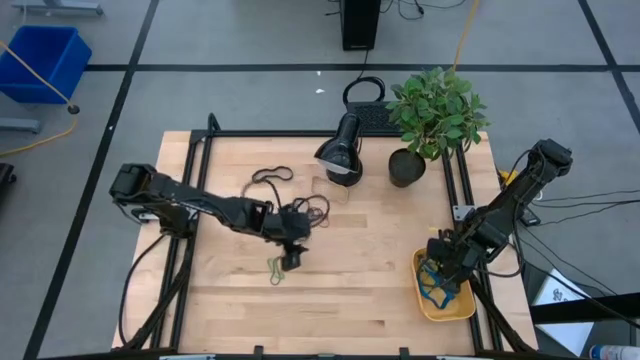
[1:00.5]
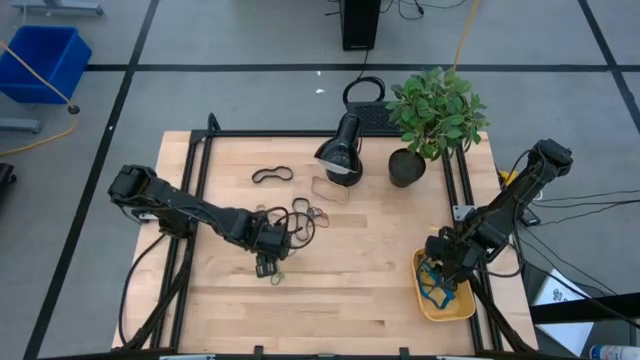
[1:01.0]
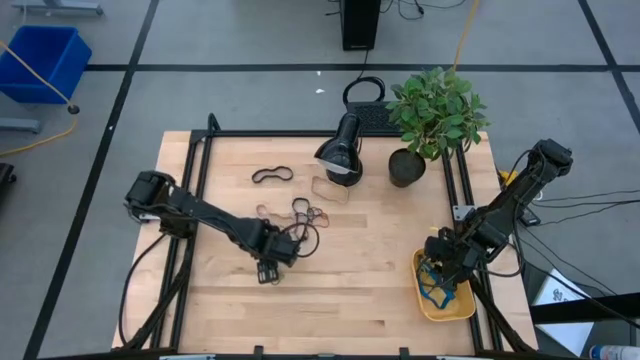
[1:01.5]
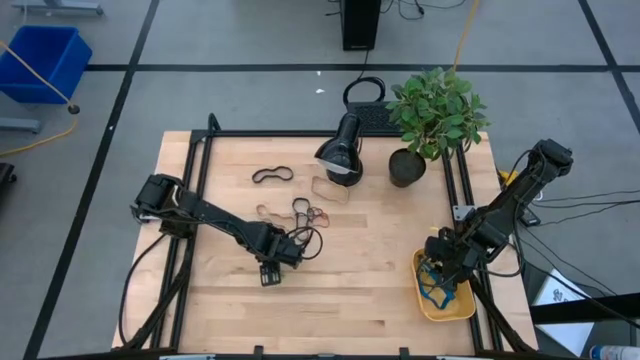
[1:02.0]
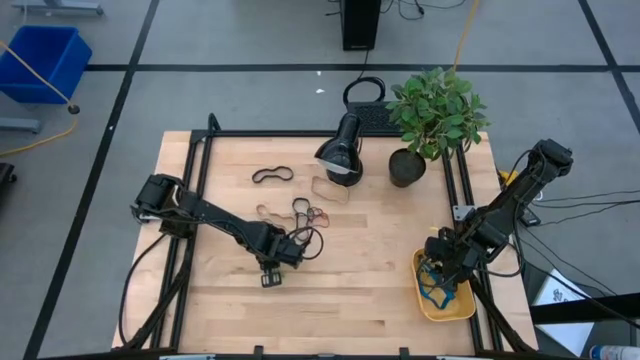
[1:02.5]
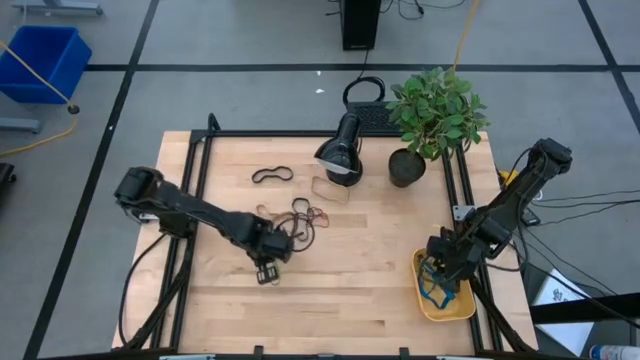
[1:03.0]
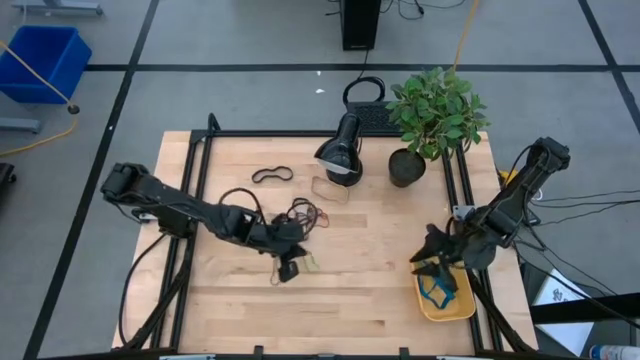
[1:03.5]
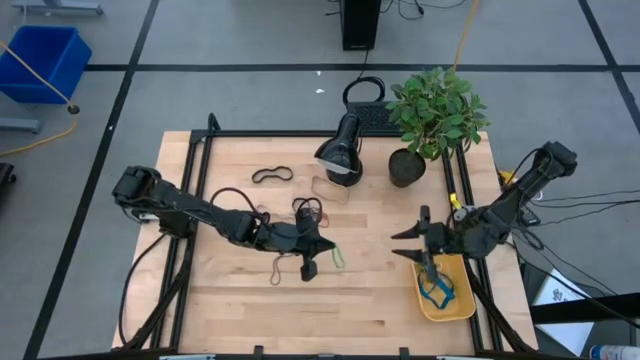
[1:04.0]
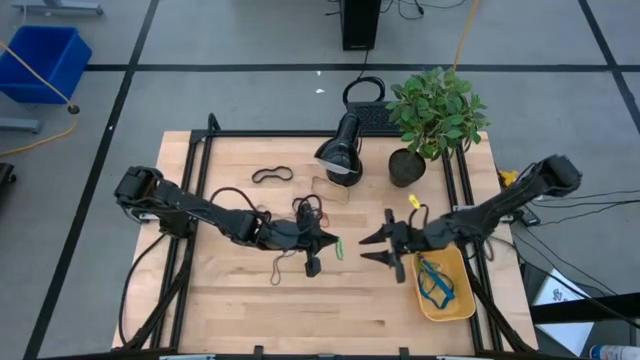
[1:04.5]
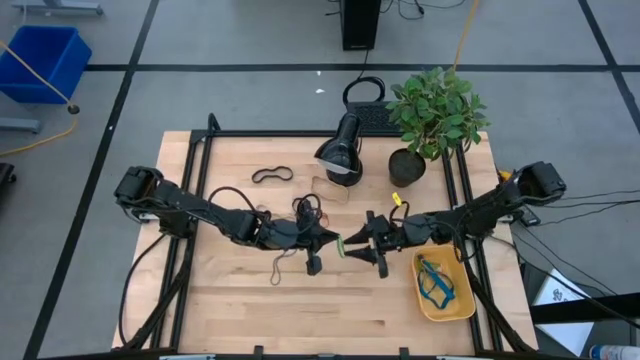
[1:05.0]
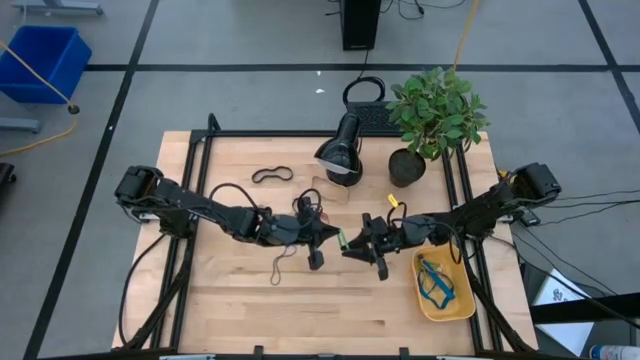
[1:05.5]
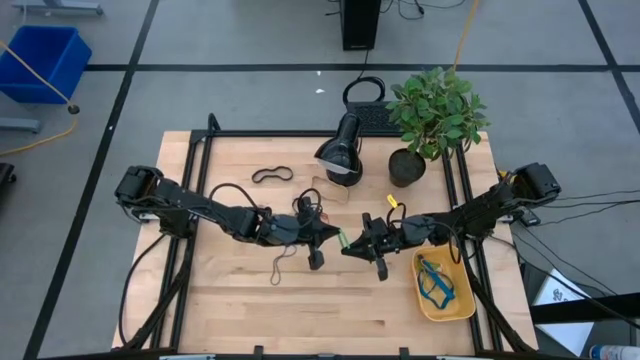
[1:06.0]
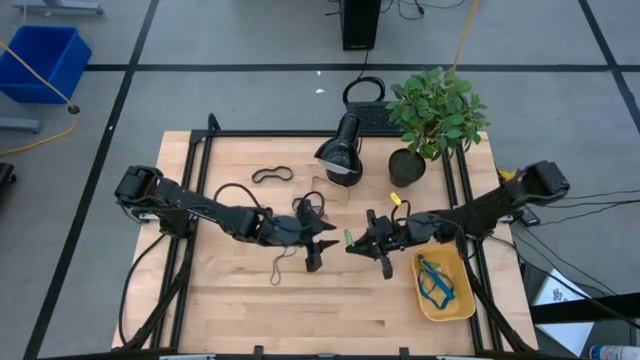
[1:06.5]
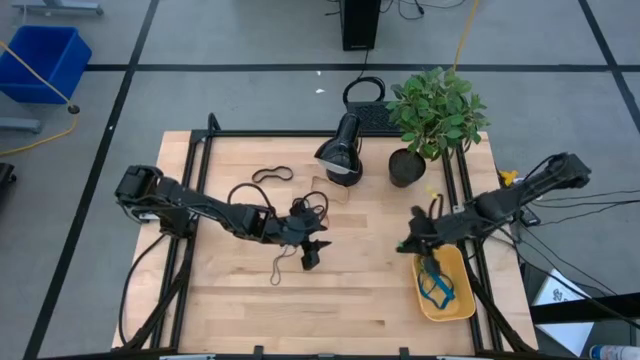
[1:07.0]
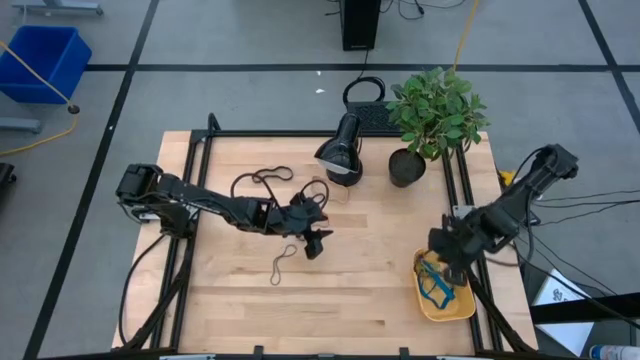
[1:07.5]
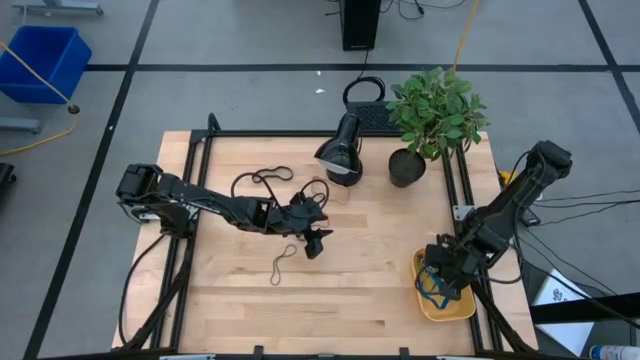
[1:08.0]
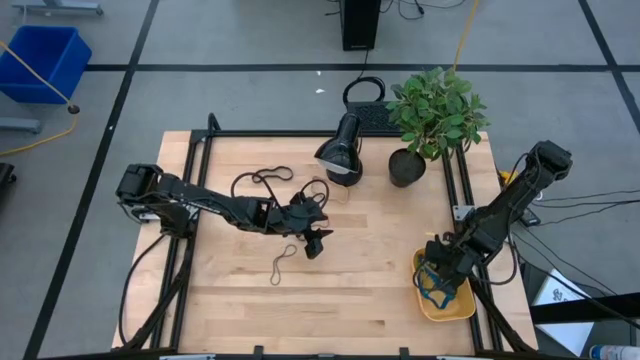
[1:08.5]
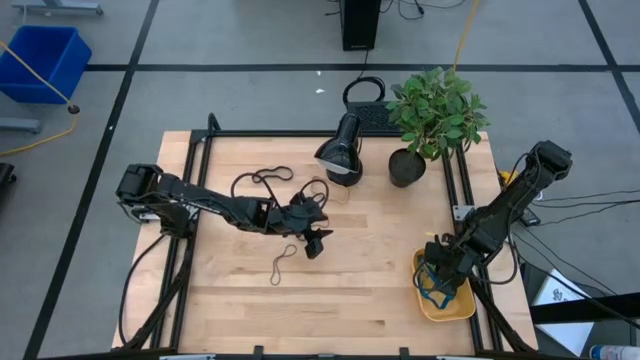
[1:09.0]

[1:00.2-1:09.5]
Task: Pick and place rubber bands into bin
Put the green rubber band into the yellow bin

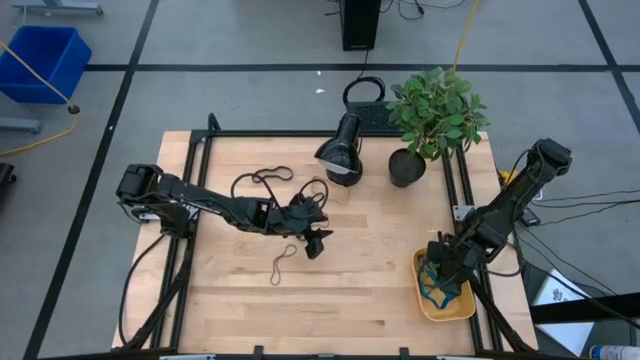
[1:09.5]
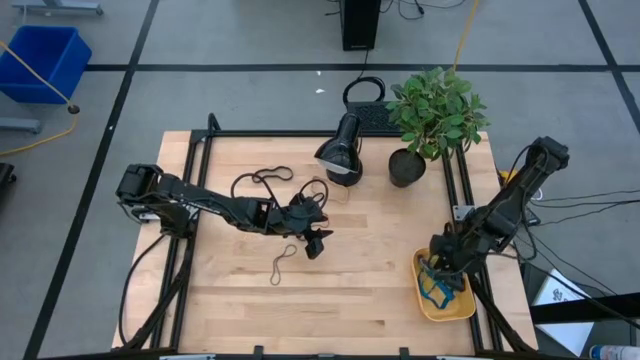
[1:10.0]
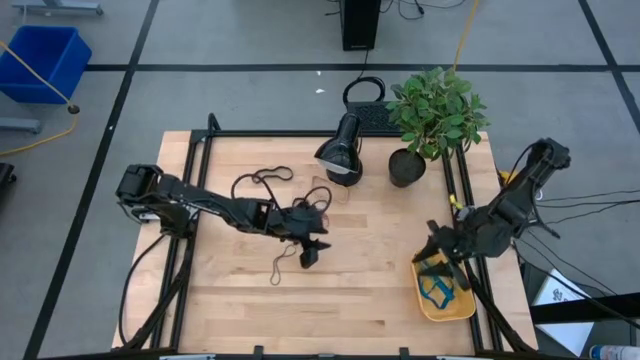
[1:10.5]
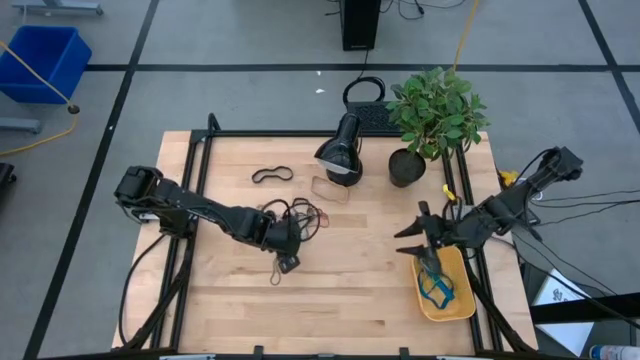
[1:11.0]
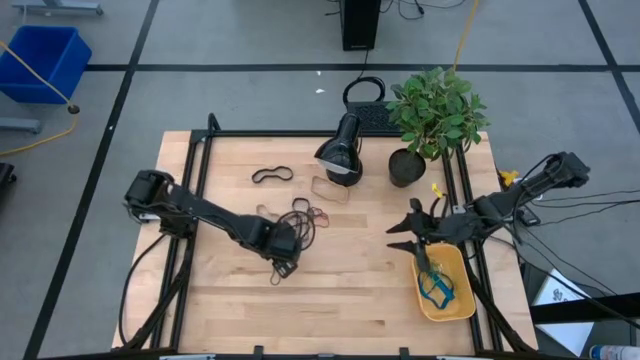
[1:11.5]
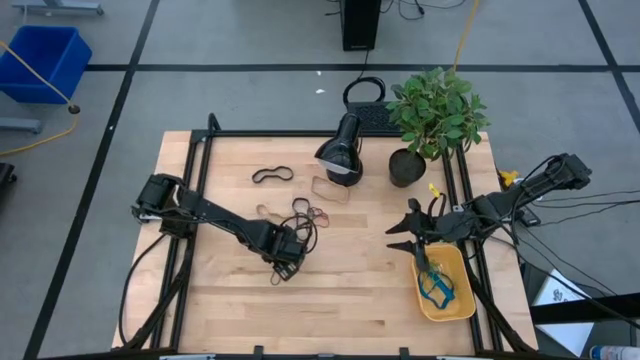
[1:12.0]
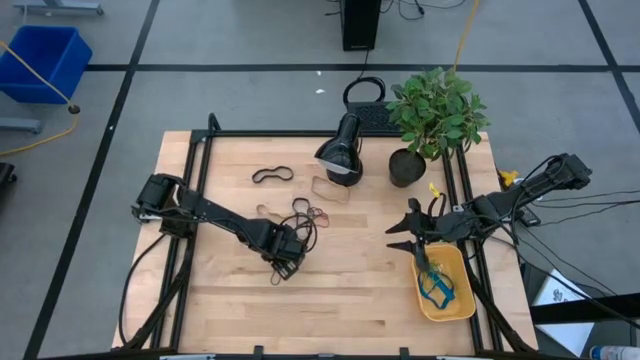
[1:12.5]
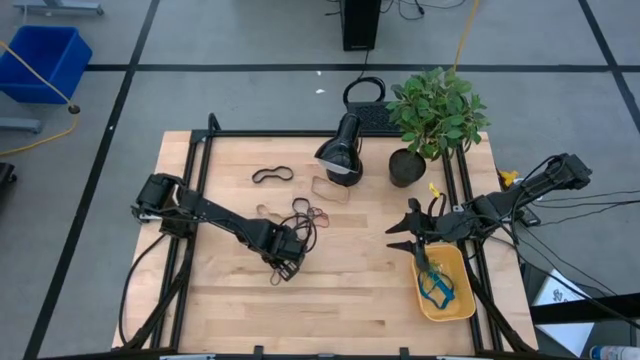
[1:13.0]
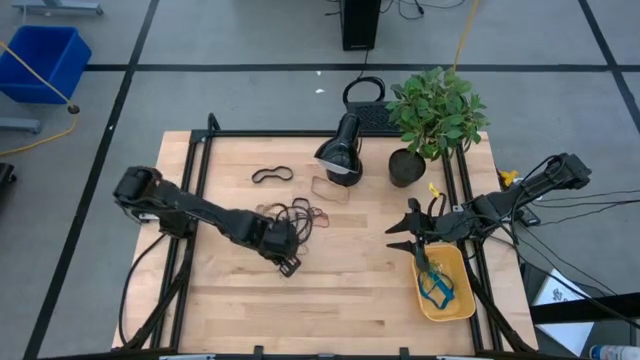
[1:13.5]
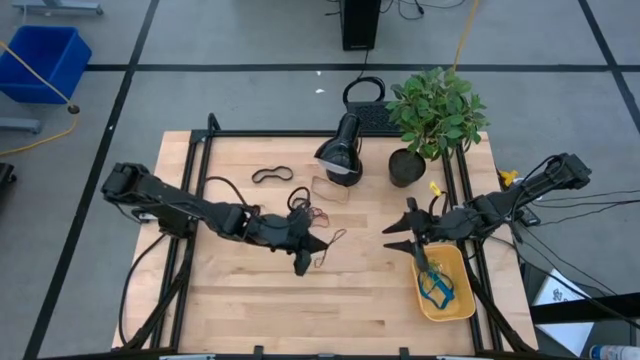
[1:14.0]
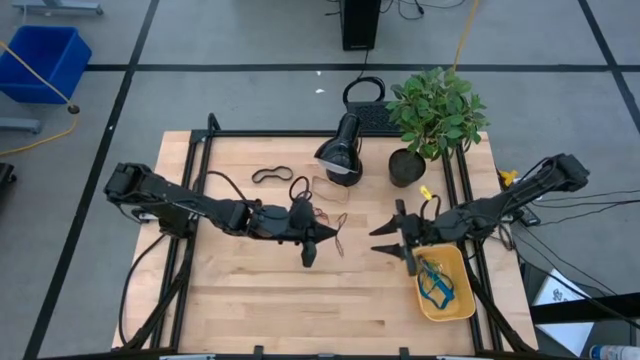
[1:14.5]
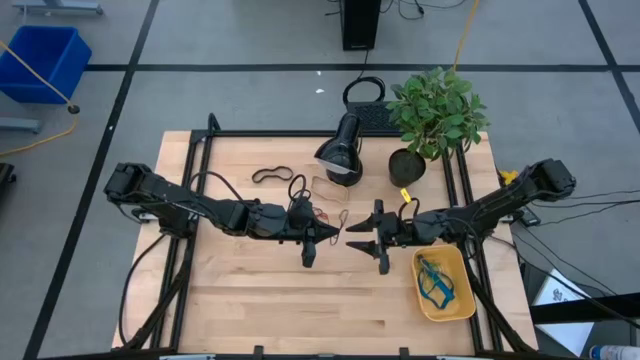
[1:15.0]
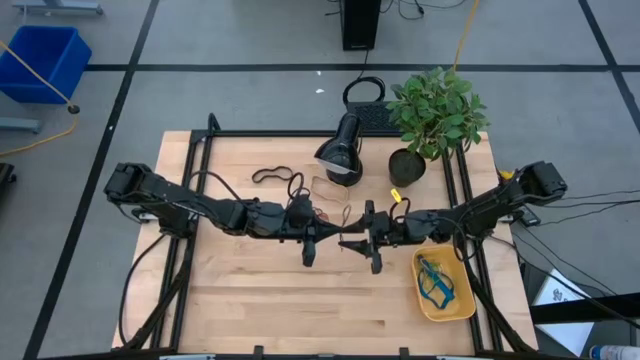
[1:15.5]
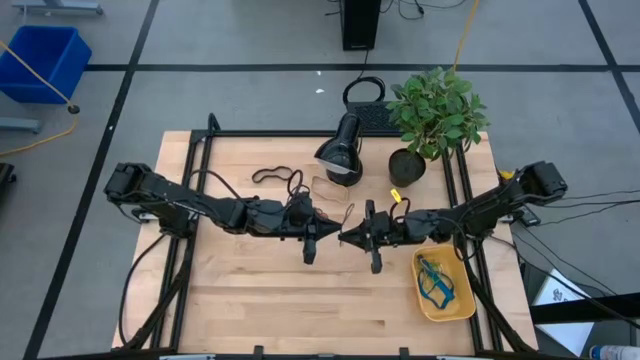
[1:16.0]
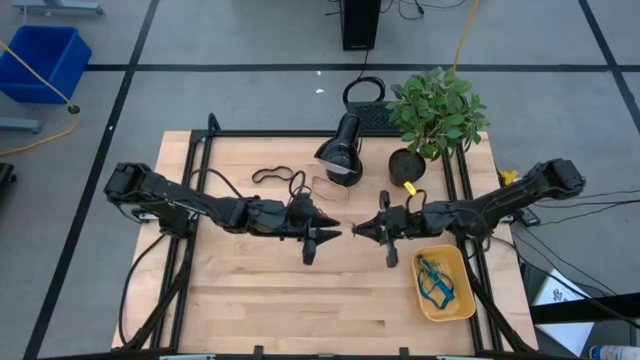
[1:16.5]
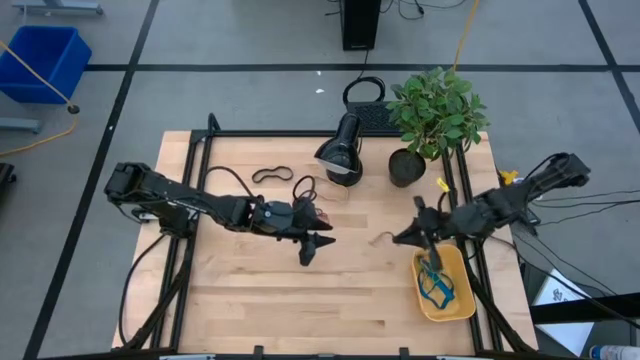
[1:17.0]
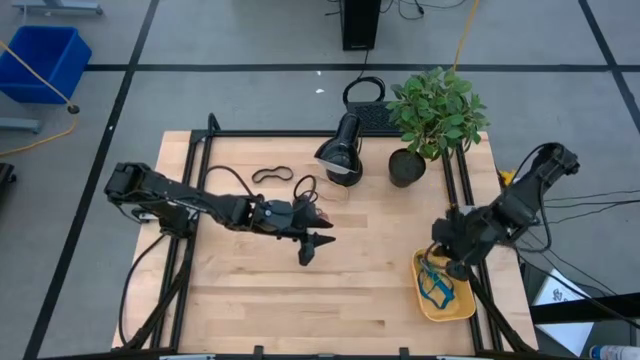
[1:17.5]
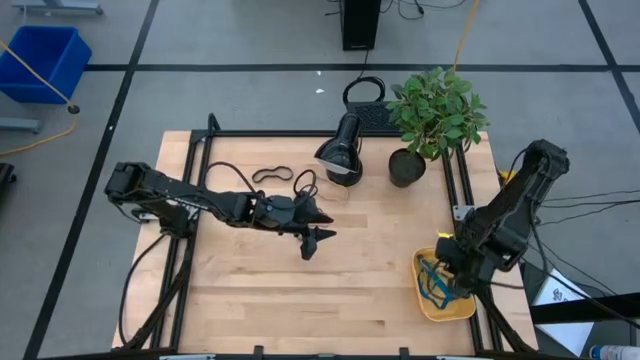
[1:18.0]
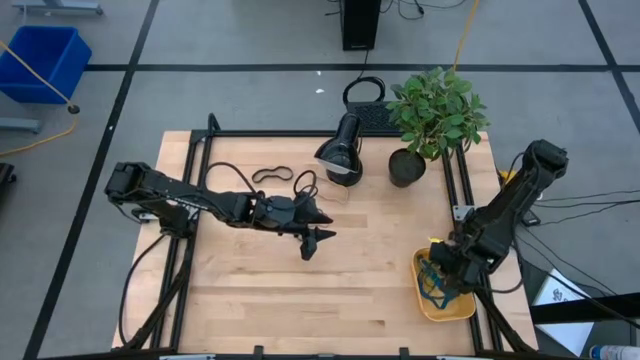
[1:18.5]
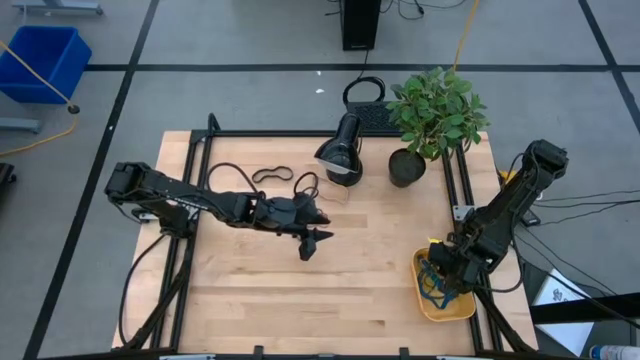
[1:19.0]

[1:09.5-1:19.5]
Put the violet rubber band into the yellow bin

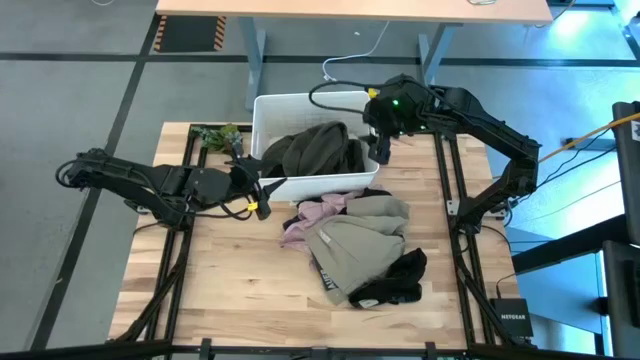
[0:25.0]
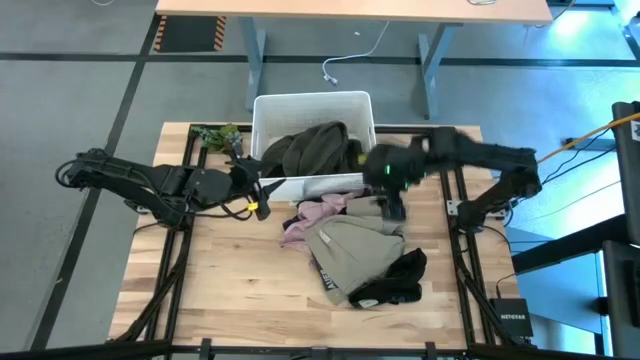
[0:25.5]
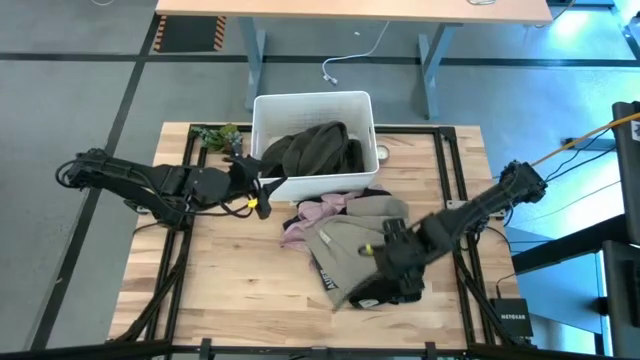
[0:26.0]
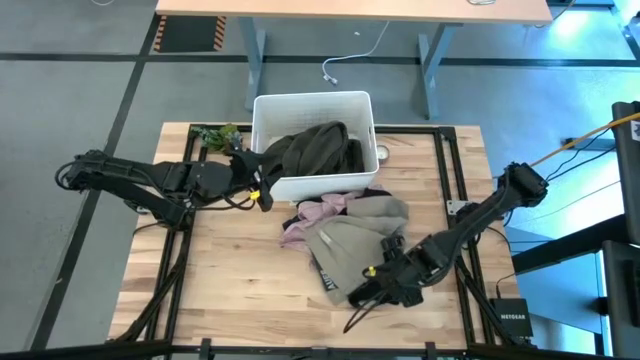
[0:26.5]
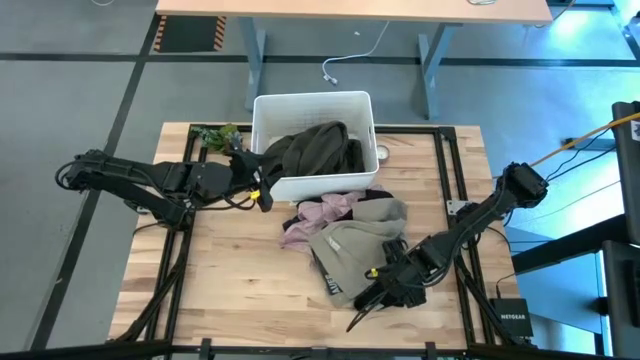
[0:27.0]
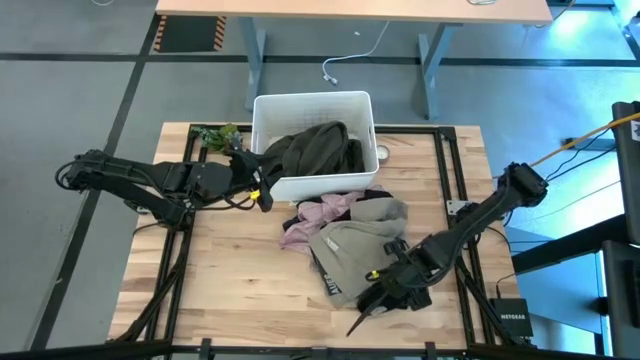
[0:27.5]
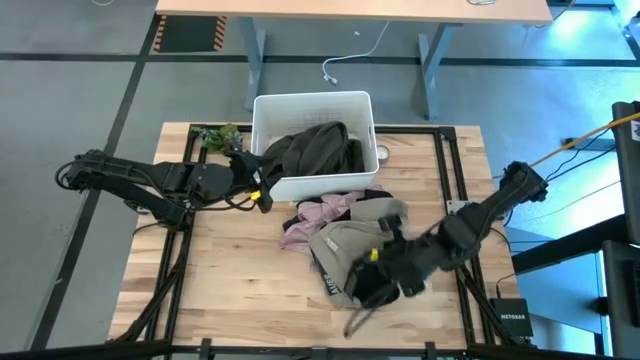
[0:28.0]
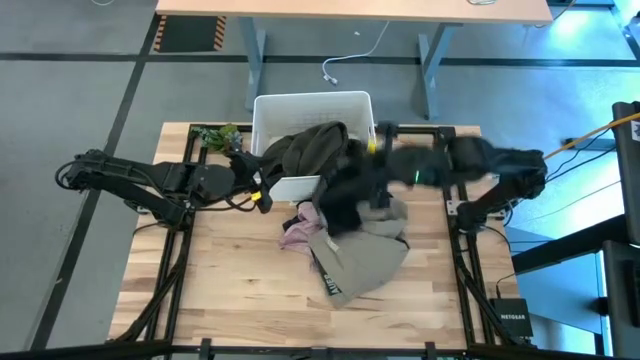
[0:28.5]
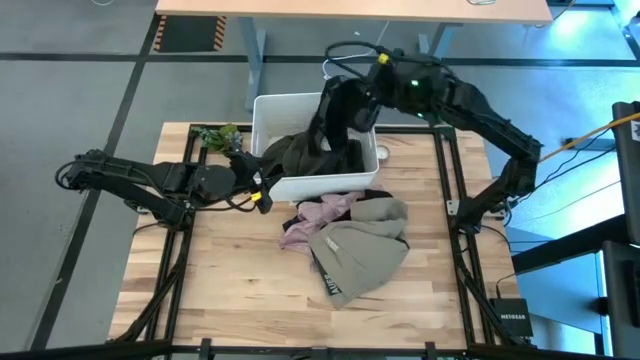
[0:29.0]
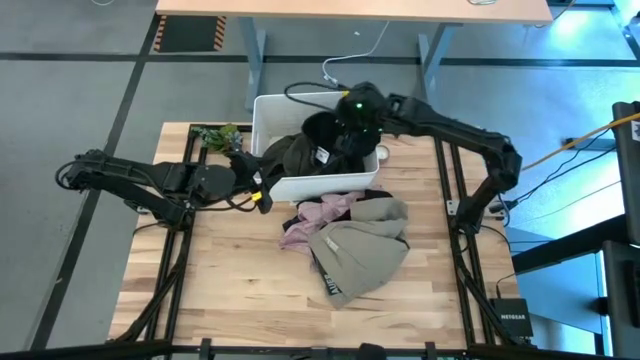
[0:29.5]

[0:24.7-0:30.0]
Task: Sort clothes
Put the black boxer into the white bin
